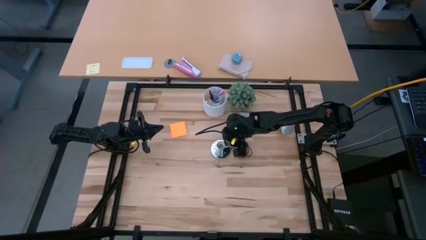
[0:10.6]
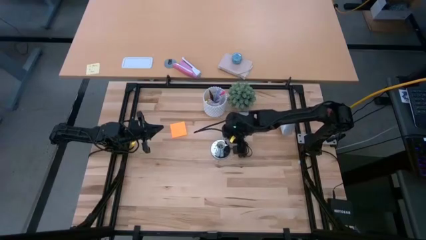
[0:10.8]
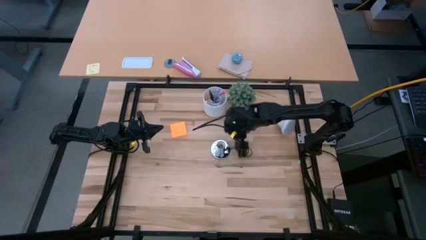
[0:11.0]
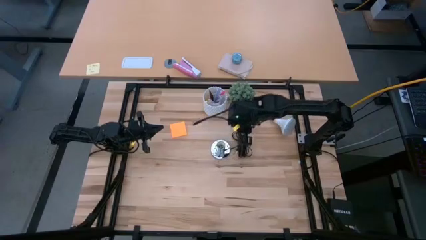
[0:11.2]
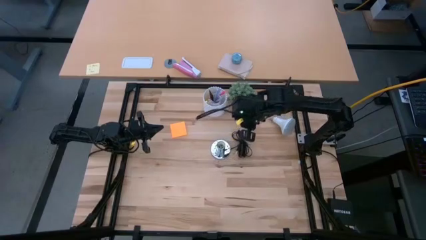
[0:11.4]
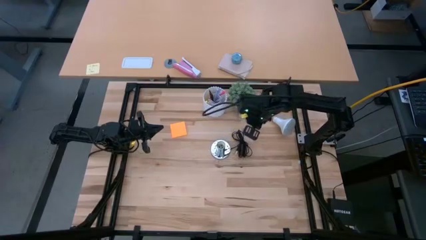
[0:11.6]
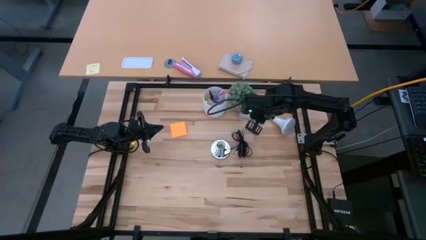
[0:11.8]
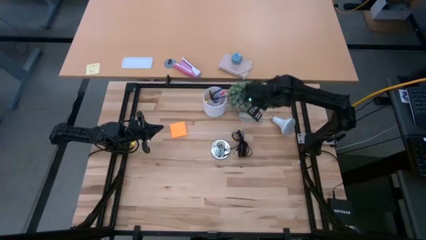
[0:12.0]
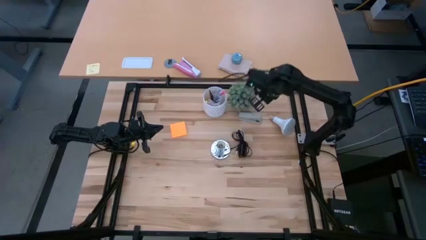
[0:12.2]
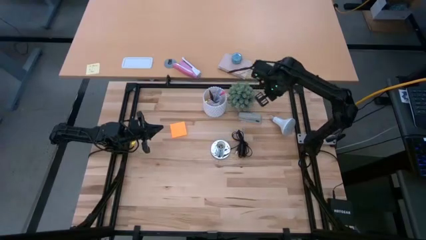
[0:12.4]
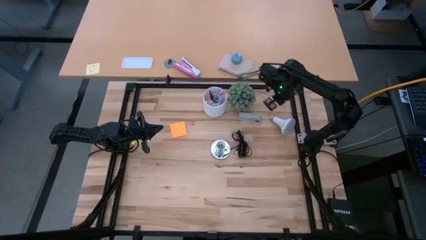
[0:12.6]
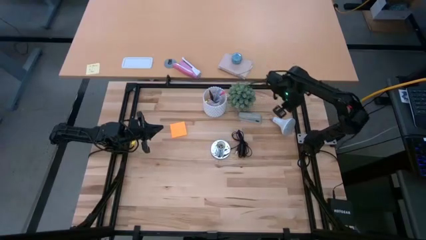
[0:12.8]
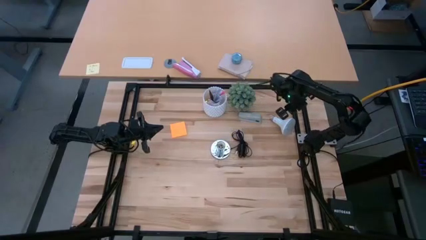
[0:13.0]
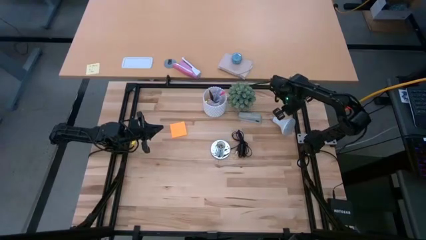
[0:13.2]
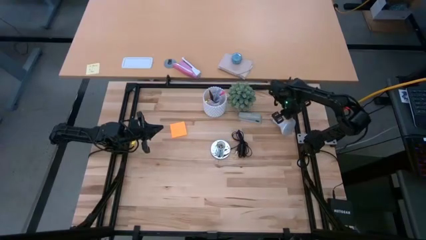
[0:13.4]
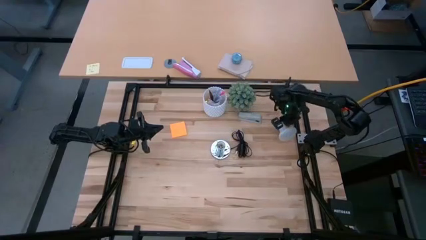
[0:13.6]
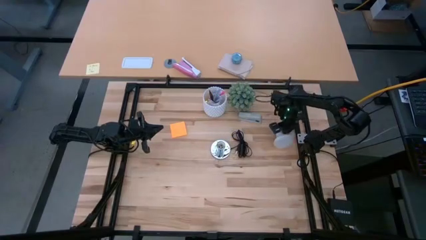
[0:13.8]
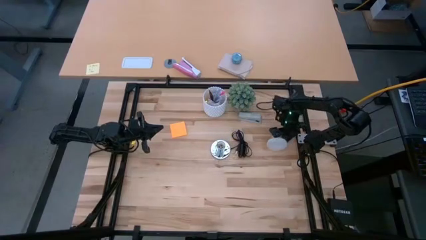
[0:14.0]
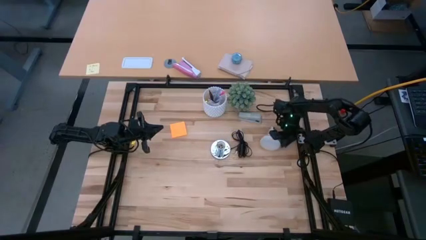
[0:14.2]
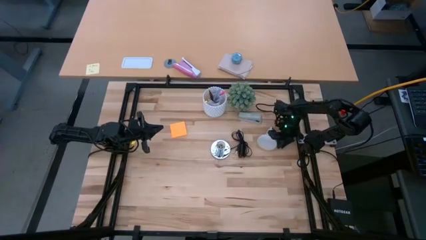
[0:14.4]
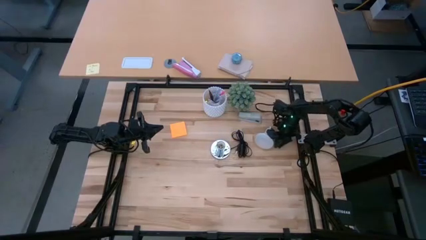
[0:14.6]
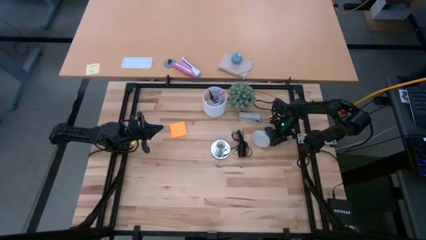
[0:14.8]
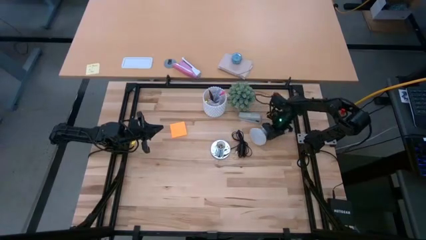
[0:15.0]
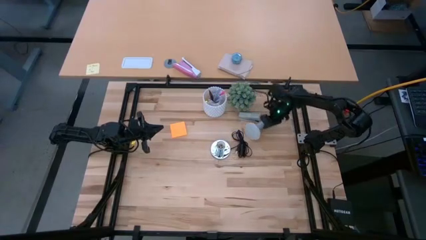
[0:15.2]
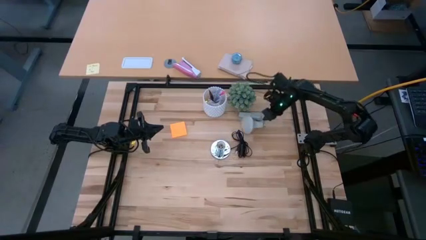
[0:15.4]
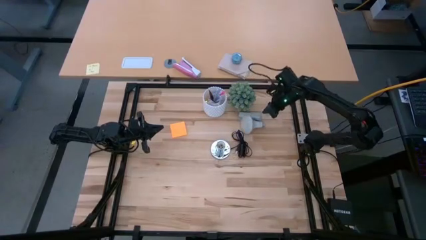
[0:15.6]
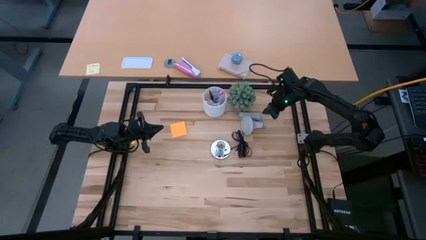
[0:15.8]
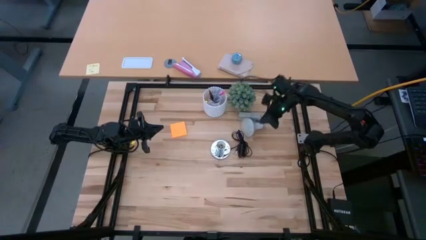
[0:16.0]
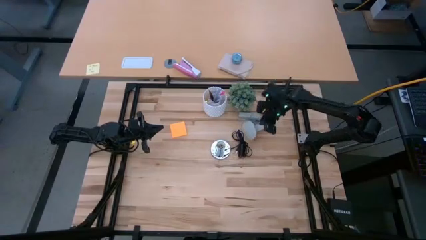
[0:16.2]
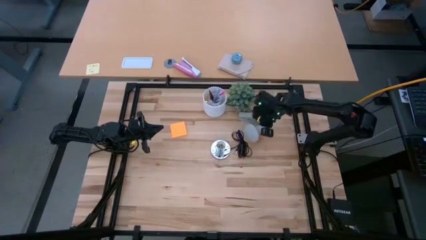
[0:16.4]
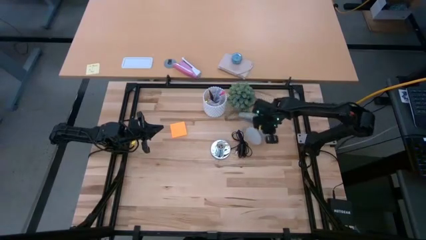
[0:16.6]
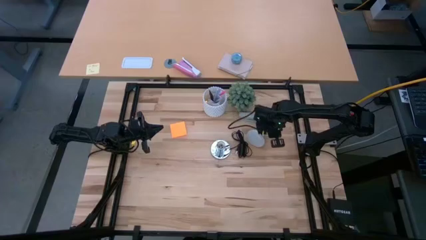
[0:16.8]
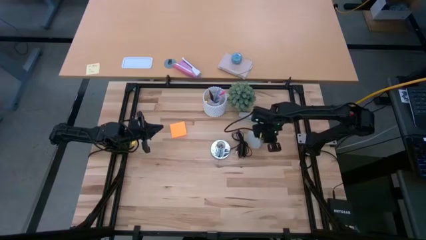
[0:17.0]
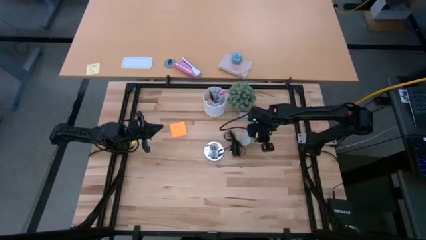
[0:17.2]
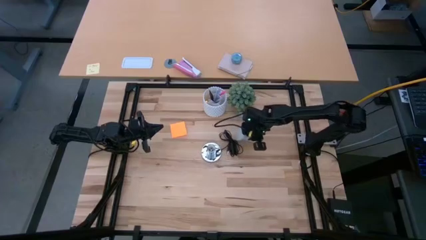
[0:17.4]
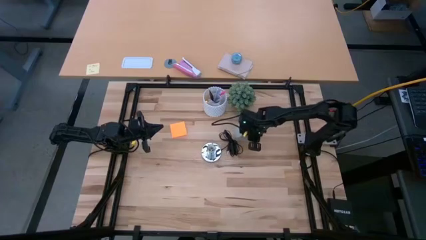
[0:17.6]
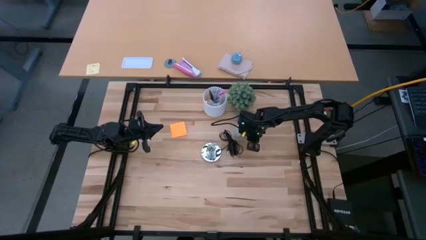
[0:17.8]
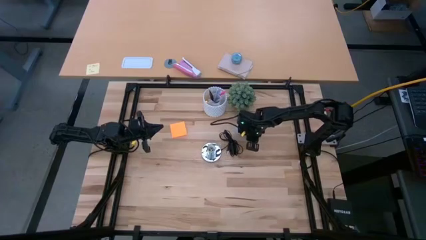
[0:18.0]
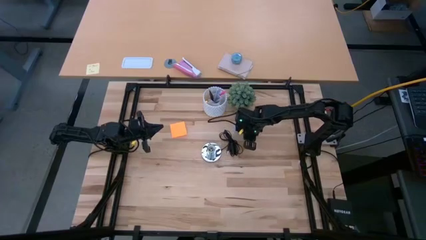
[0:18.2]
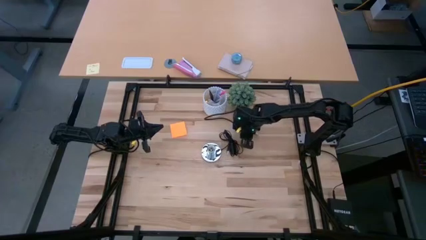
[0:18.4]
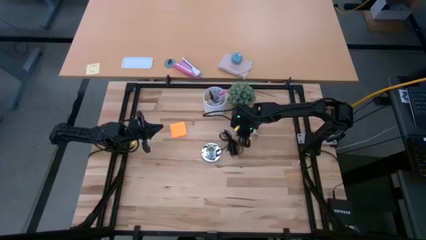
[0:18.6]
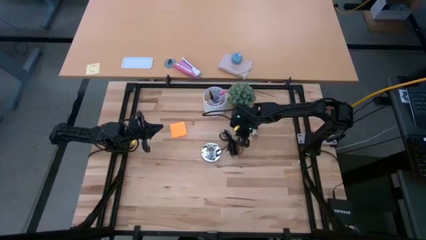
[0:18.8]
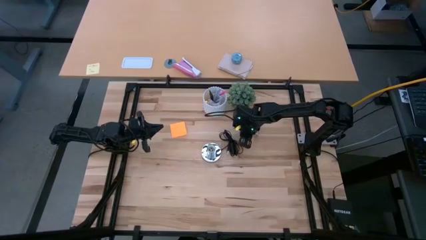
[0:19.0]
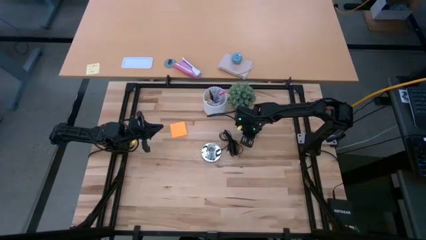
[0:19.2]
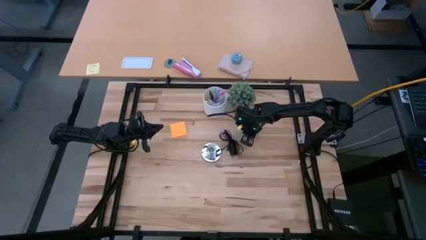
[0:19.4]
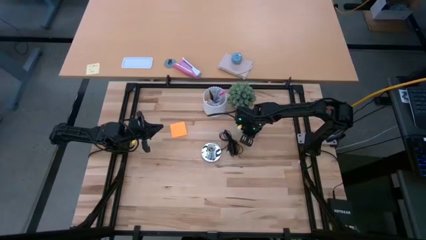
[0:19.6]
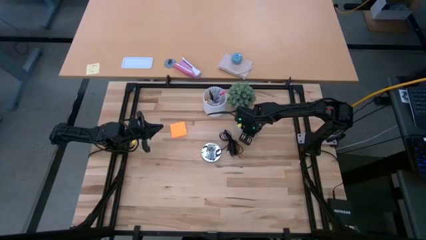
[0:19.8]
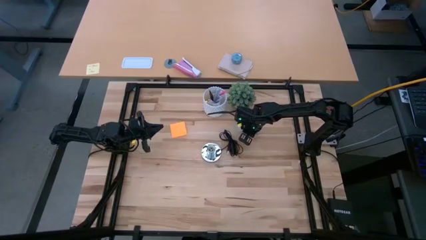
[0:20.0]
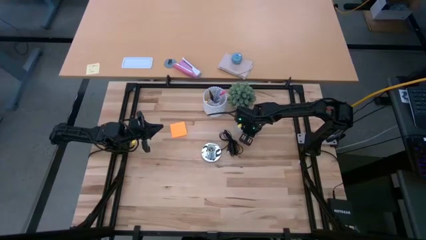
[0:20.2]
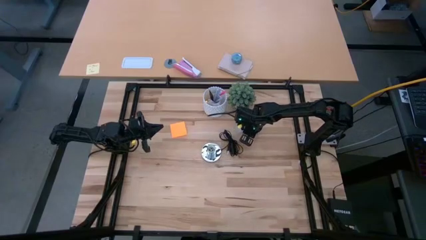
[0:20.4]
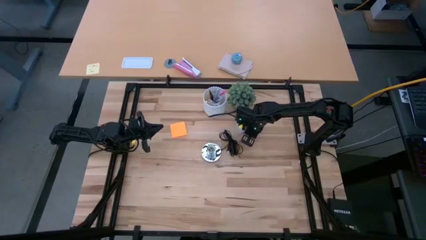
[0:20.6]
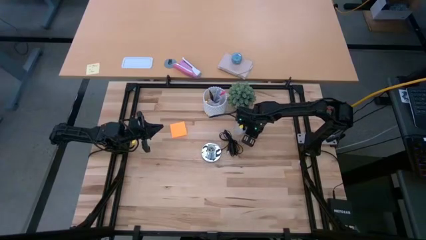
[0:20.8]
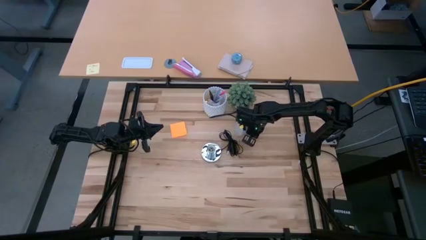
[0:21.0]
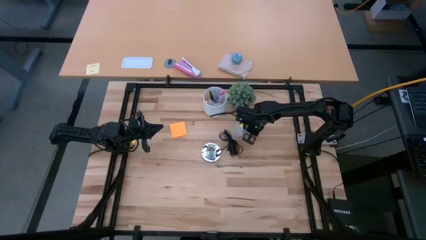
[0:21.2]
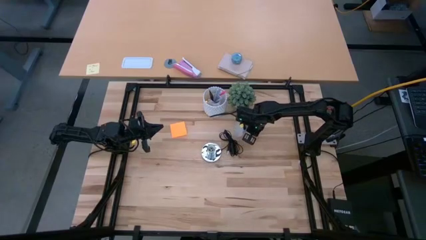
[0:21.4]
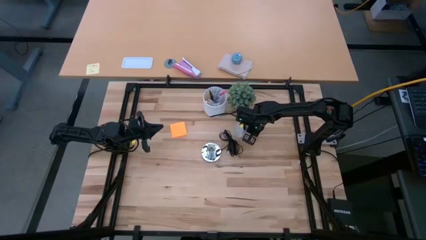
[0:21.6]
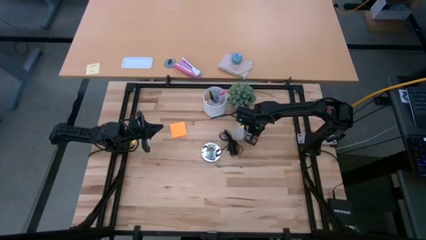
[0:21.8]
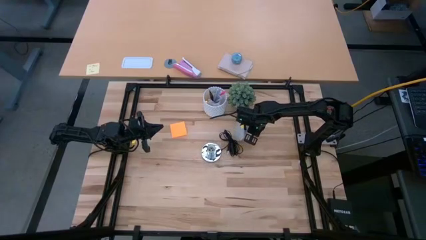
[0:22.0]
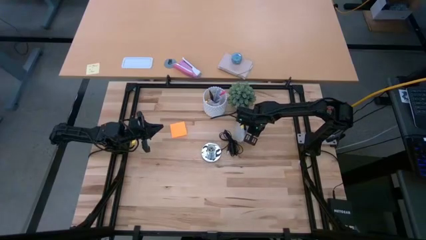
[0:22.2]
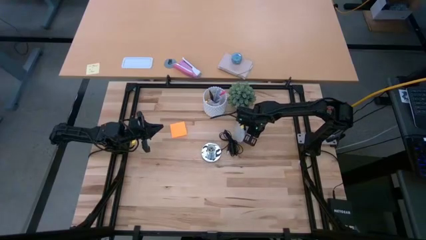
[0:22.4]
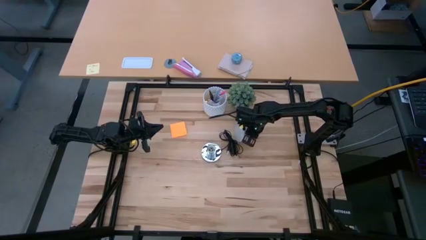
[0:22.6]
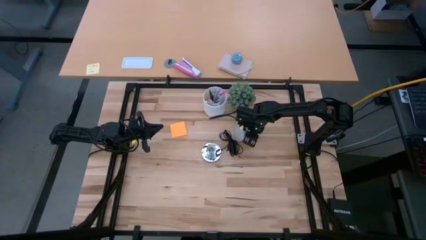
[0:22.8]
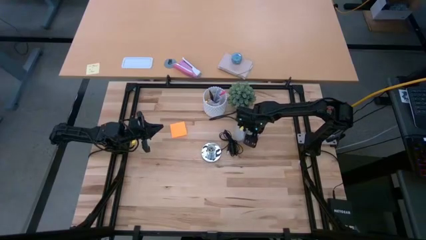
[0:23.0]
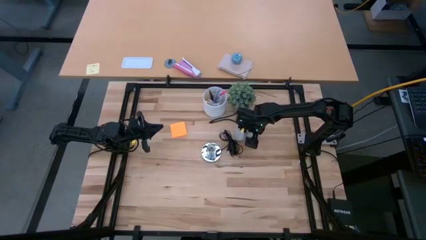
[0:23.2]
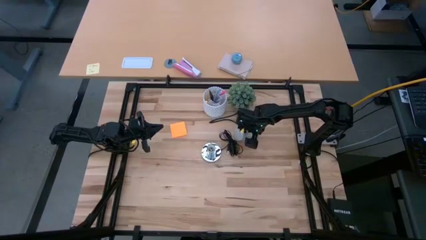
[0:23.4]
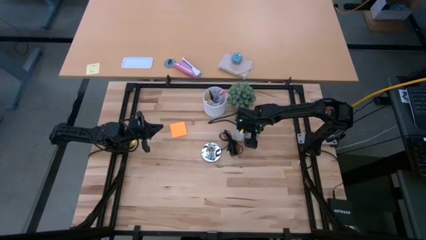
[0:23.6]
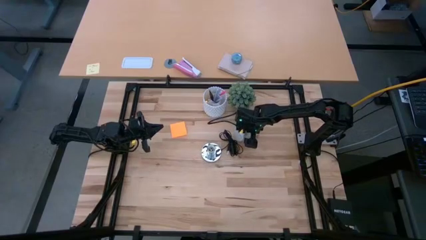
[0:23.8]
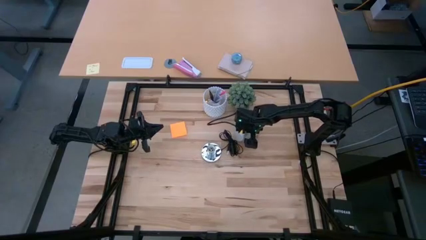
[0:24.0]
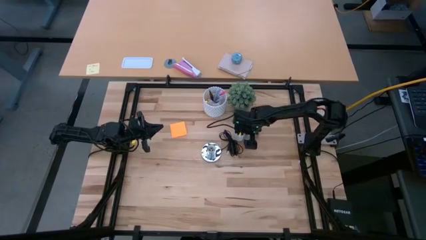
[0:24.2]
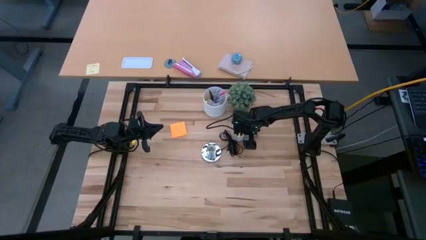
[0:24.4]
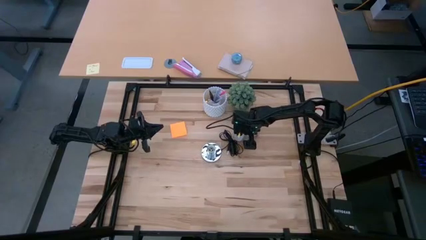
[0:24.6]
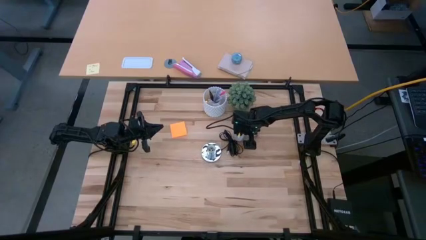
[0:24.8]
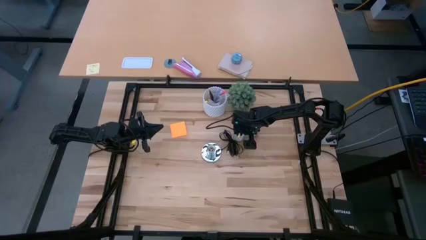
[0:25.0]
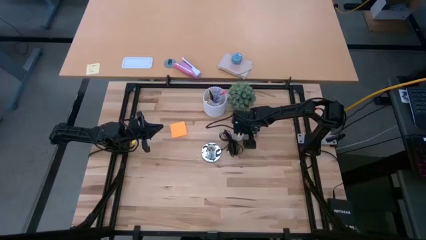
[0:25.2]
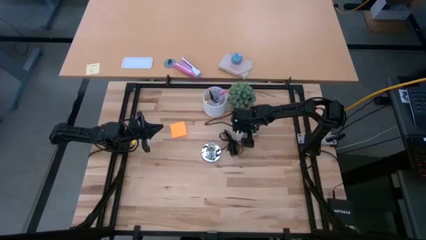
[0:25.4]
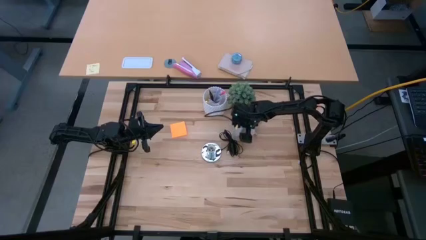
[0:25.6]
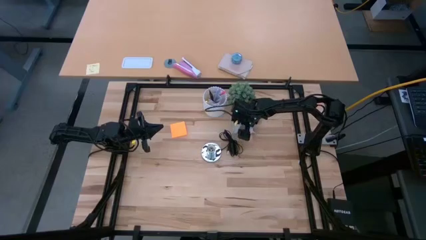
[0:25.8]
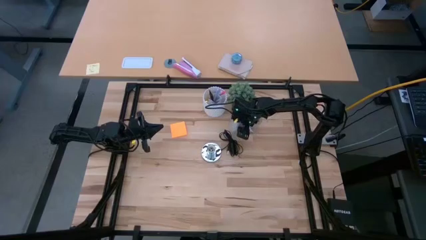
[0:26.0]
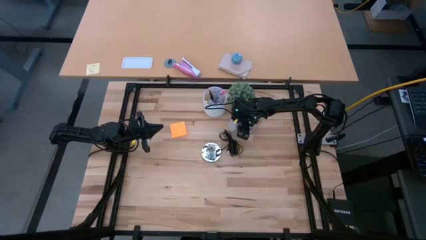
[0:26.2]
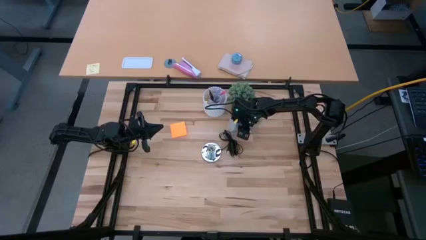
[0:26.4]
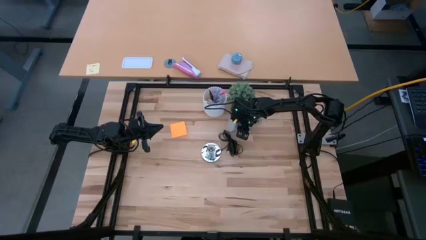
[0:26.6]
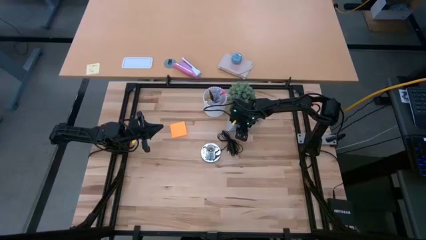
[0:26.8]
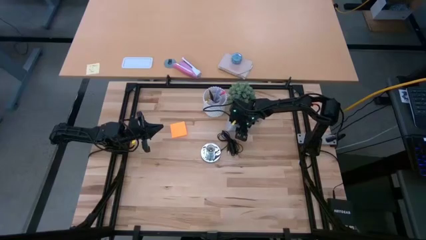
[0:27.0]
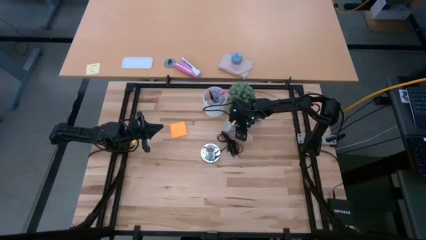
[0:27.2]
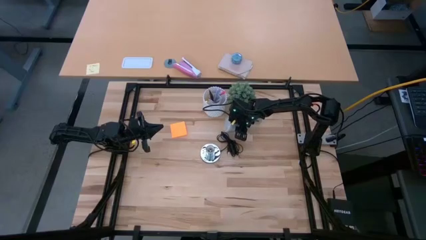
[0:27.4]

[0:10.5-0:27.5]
Task: Screw lightbulb
Insert the light bulb into the lamp socket
